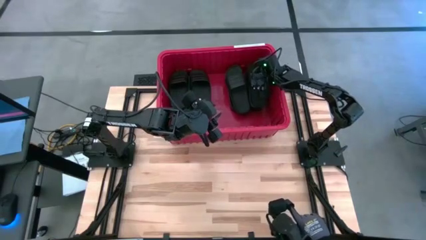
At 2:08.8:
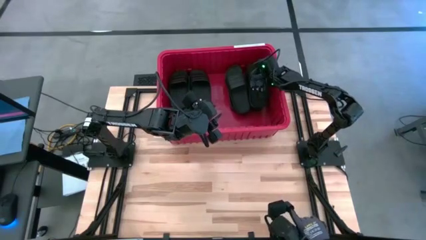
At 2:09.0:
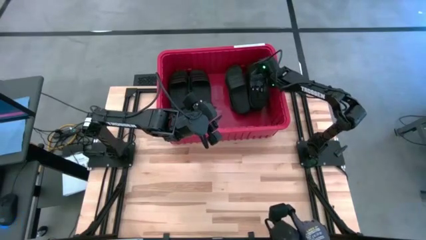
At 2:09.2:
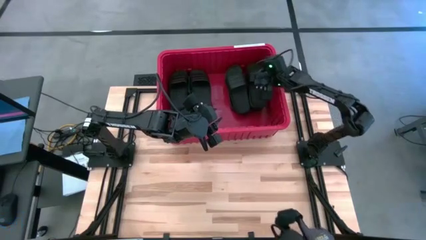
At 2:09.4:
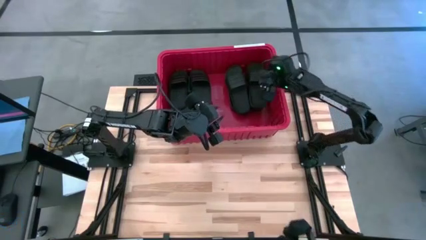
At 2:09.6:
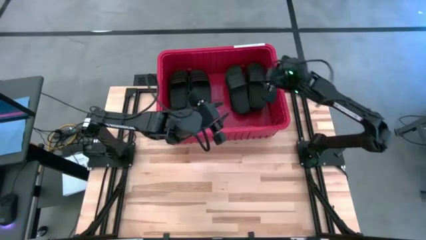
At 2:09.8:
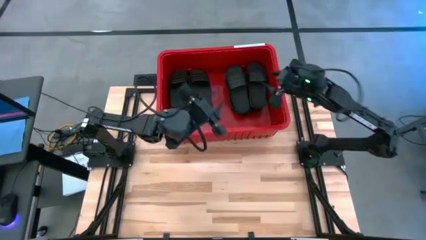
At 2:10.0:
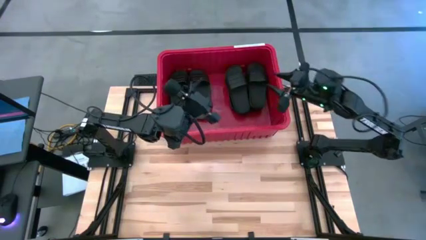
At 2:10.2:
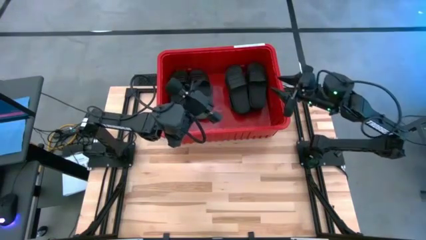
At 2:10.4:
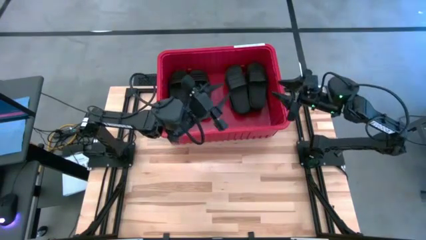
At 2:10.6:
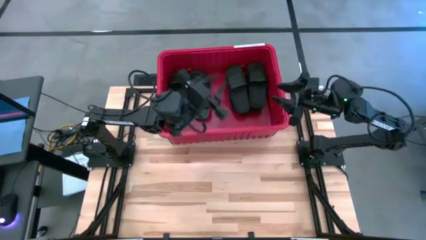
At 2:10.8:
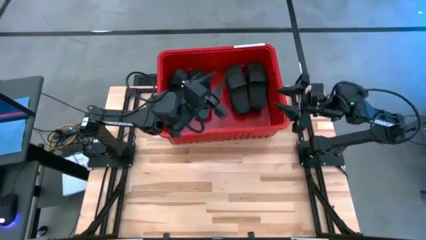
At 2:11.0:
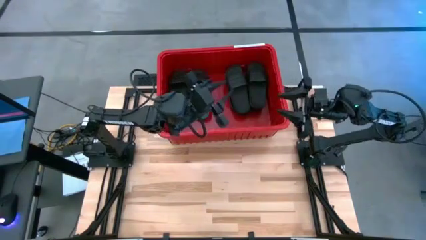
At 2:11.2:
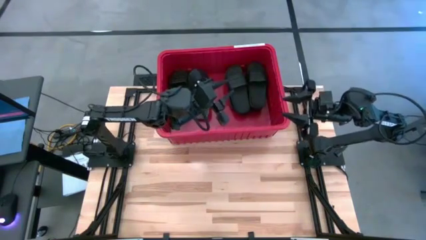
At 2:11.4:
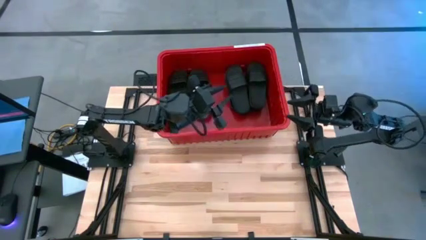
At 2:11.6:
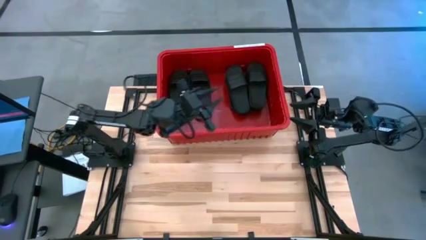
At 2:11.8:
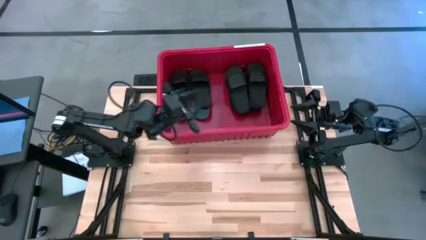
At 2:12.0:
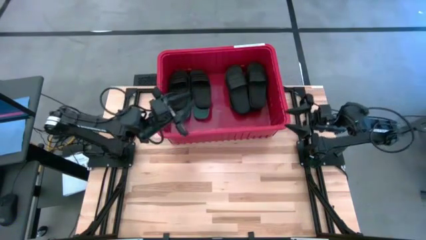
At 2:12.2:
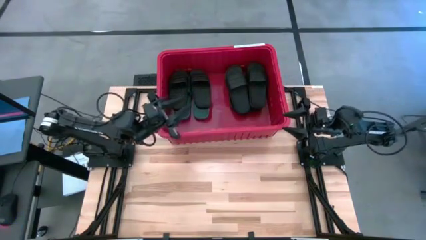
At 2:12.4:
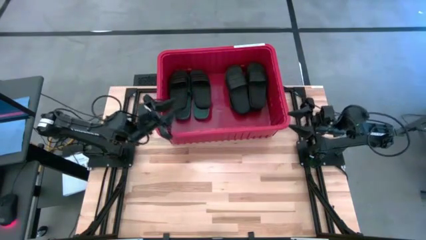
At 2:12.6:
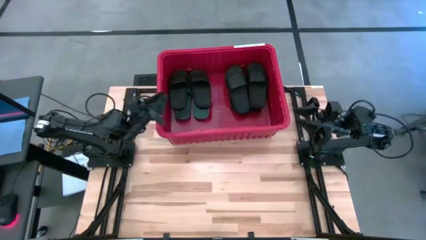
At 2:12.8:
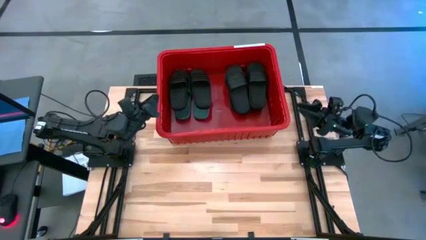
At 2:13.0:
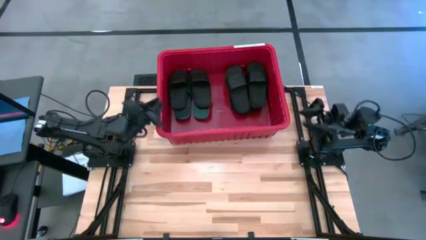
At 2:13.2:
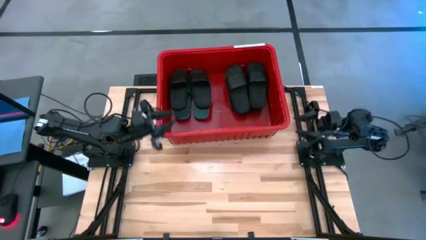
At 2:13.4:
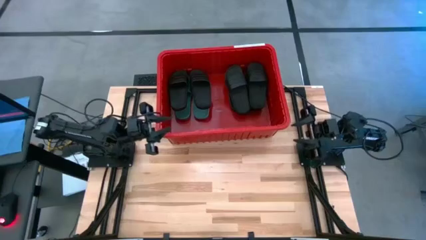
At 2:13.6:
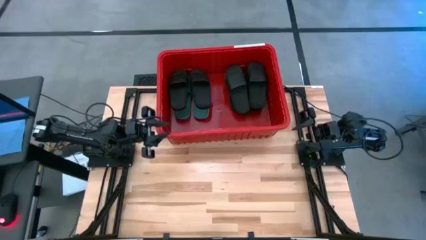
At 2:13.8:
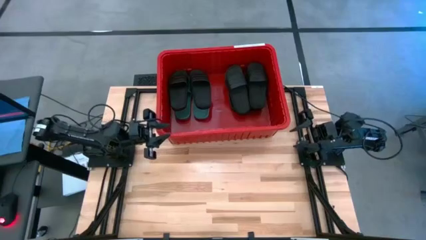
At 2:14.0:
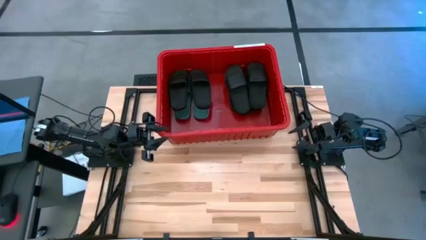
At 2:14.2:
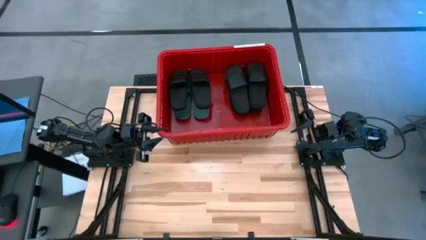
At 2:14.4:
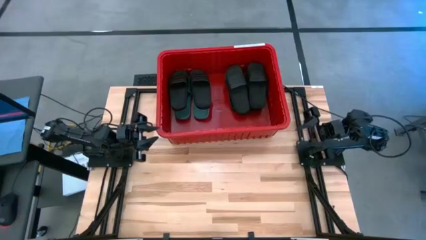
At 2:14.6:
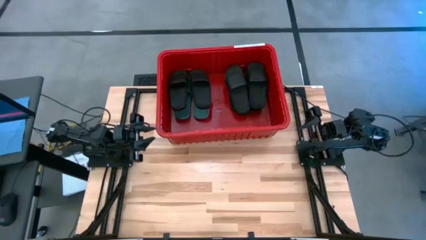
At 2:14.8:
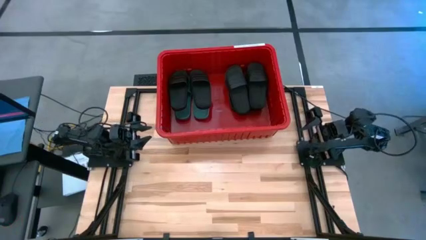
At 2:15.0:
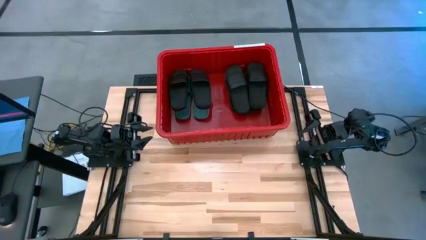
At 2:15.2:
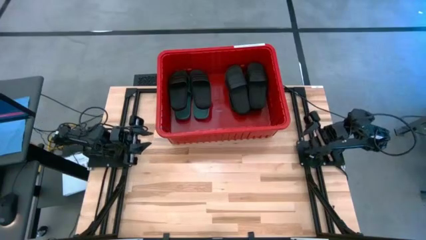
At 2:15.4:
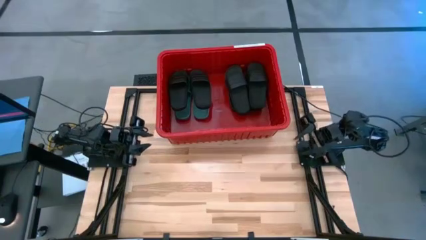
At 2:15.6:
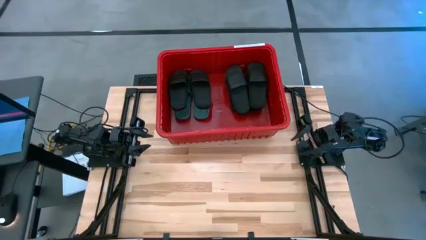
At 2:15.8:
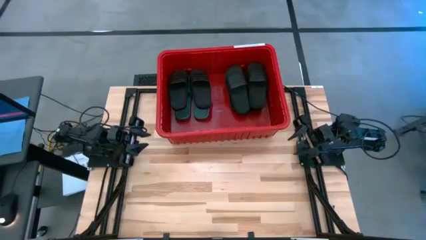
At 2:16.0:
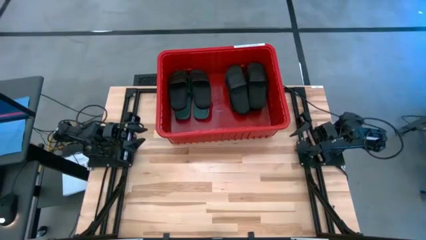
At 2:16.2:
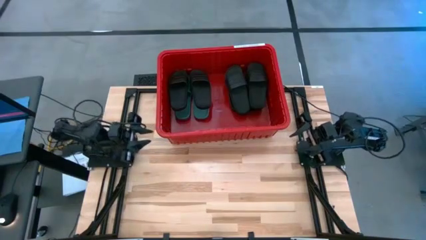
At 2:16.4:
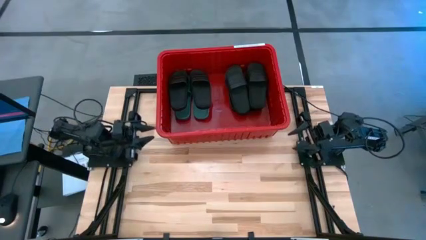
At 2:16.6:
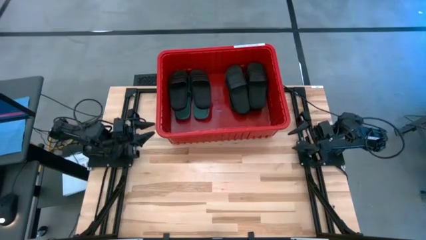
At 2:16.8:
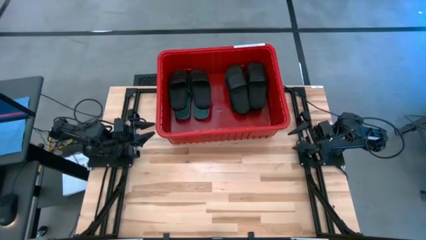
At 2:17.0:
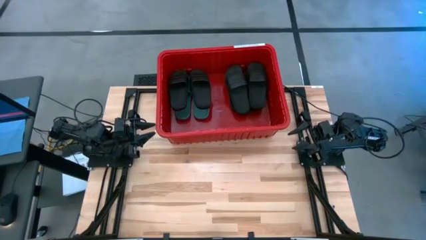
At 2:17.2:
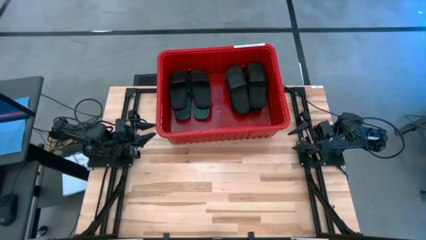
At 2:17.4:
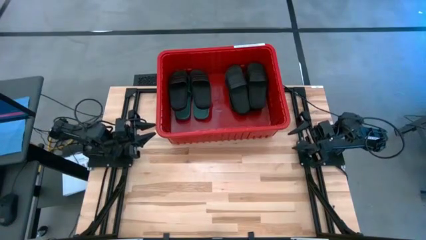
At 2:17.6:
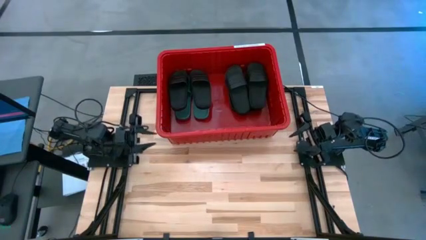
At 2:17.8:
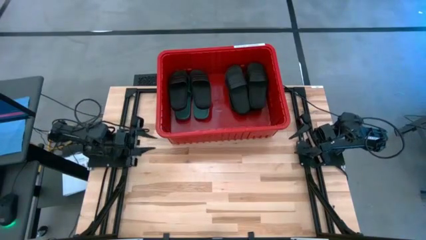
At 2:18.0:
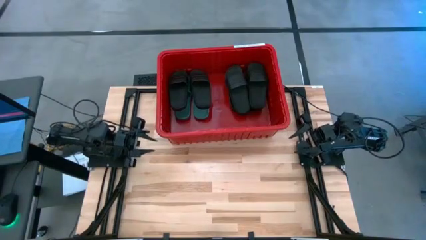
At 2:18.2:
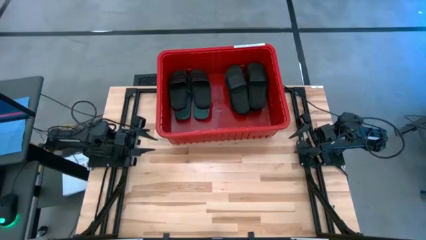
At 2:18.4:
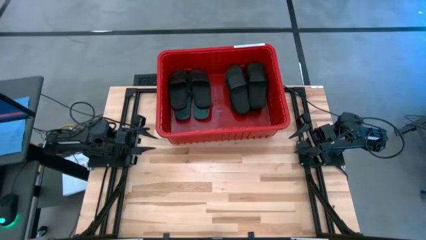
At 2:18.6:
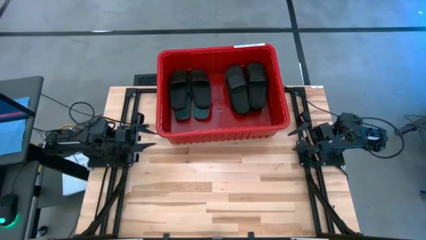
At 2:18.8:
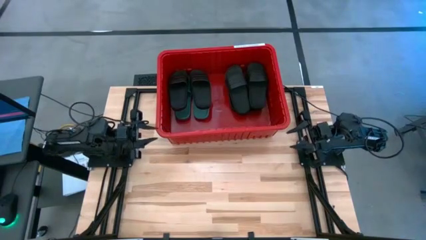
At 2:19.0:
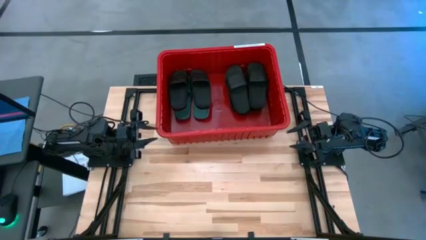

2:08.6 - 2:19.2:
Task: Pick and place slides into bin
Return to Home Position

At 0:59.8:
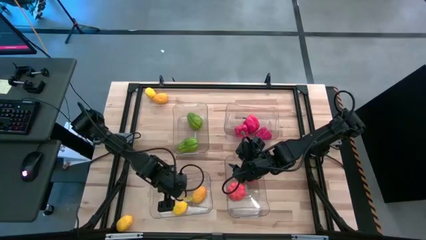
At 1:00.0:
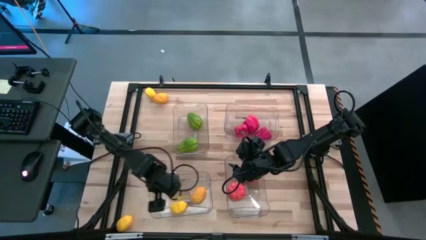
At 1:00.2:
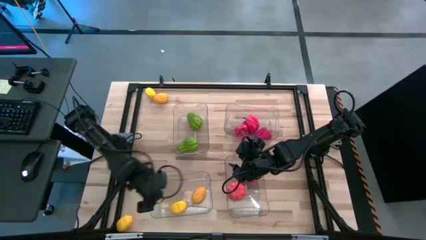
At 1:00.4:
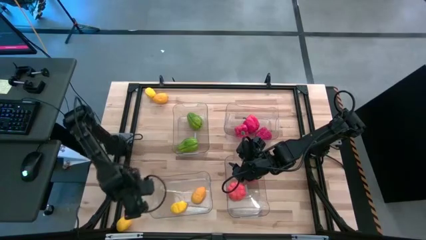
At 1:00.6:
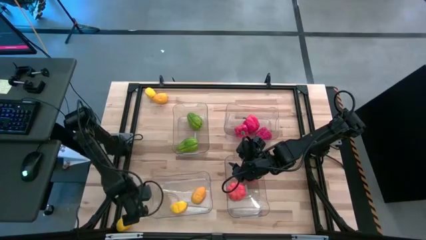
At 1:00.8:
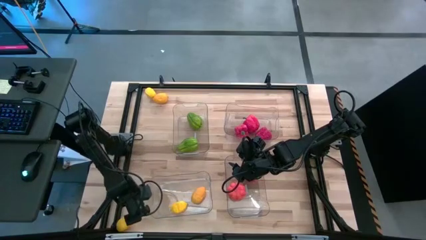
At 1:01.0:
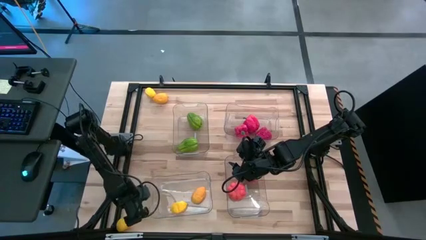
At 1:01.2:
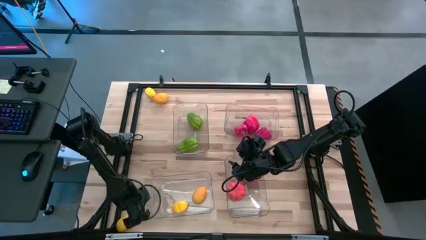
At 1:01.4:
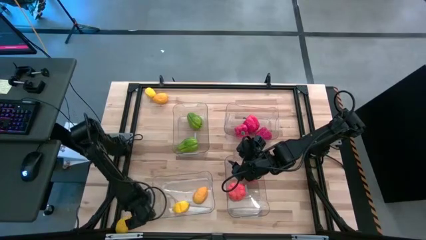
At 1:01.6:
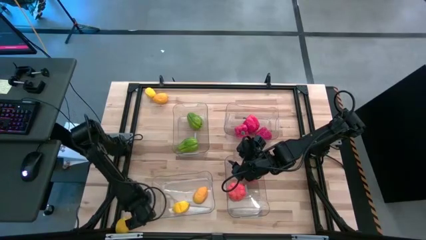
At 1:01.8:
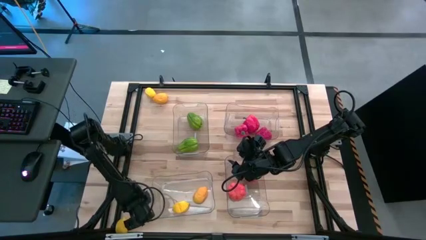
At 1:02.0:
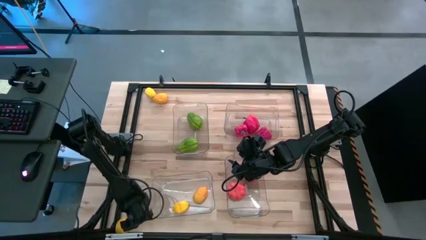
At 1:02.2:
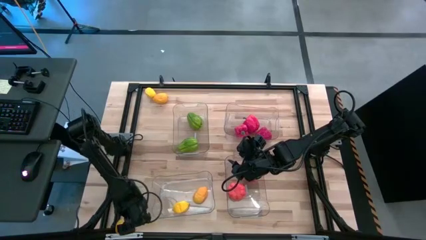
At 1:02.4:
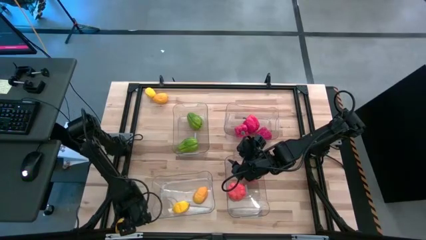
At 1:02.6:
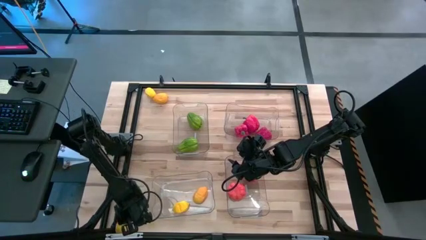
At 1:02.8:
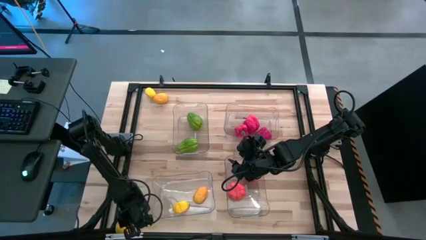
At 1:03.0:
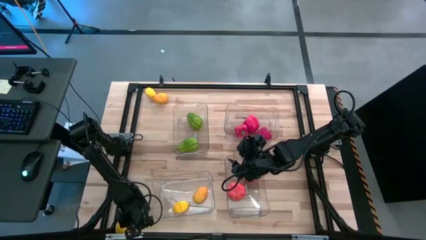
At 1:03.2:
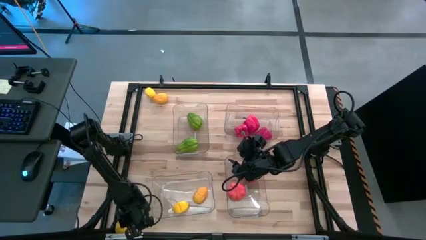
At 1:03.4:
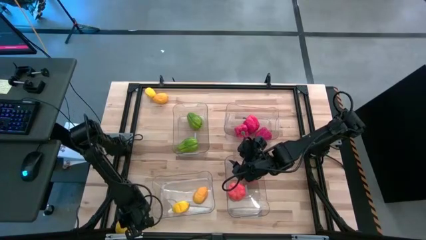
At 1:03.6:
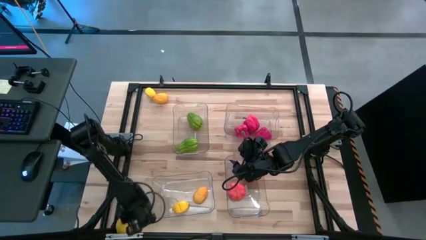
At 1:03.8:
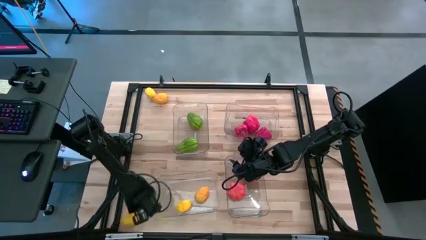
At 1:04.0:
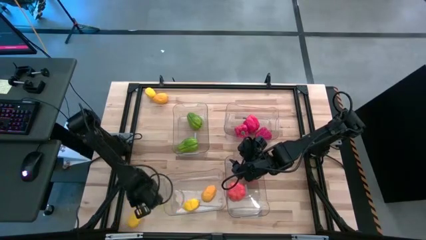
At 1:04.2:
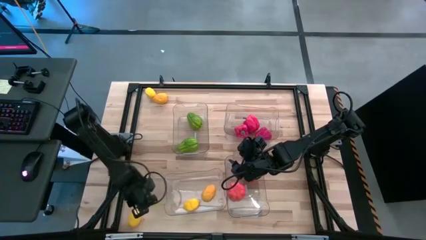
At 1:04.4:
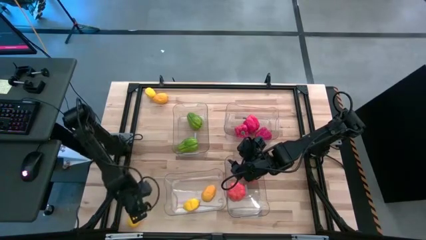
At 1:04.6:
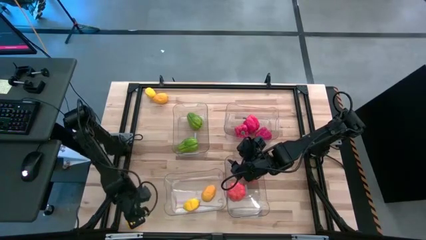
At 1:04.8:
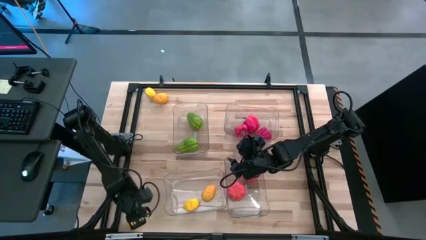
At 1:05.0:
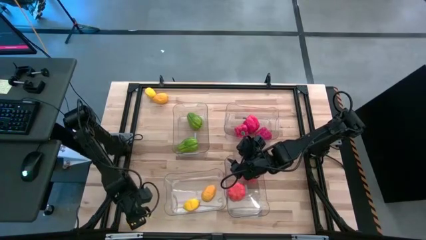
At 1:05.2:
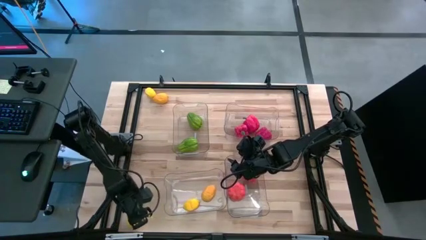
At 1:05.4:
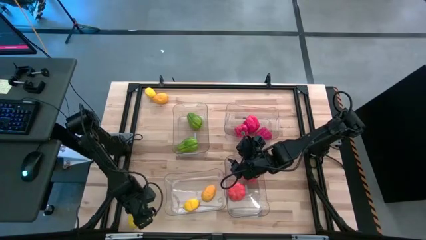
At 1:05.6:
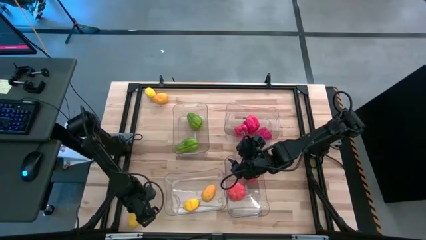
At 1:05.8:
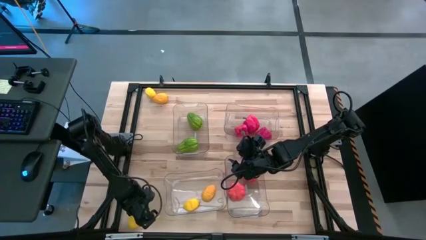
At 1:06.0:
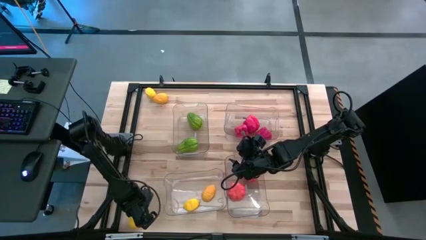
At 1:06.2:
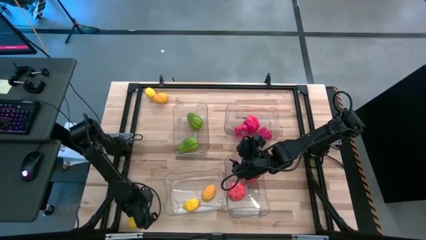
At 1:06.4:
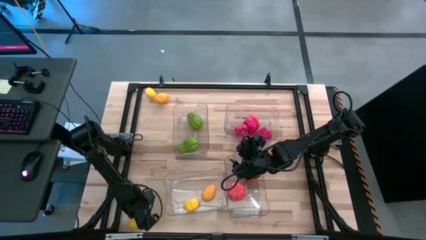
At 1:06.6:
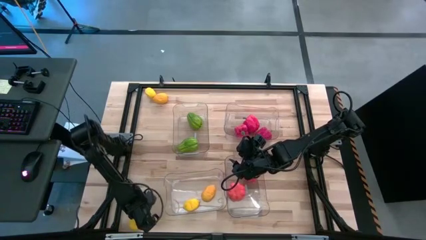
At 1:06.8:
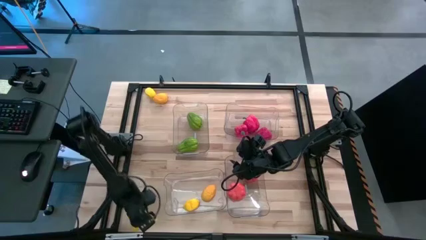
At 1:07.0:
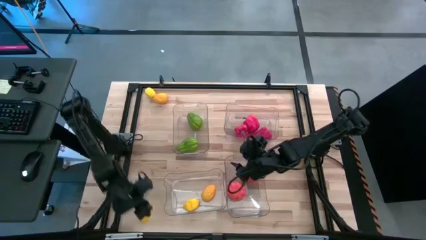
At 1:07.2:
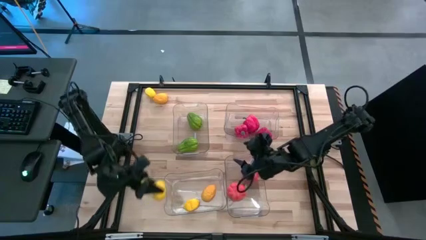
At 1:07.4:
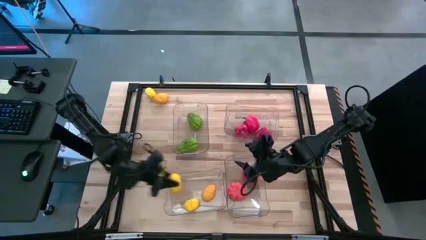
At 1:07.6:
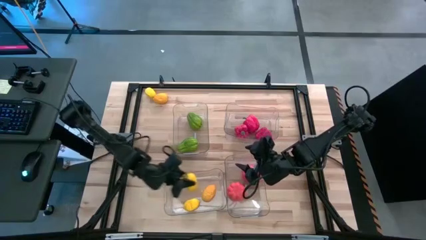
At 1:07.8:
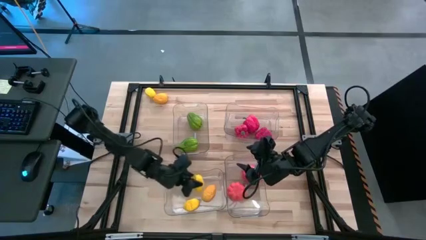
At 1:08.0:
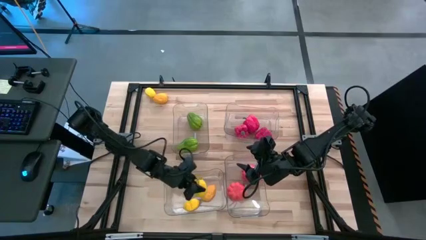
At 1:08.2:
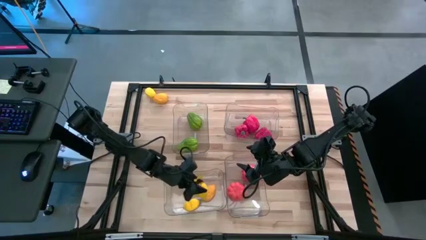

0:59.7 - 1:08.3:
Task: Sort produce into baskets
Put the bottom left yellow lemon into the bottom left transparent bin
